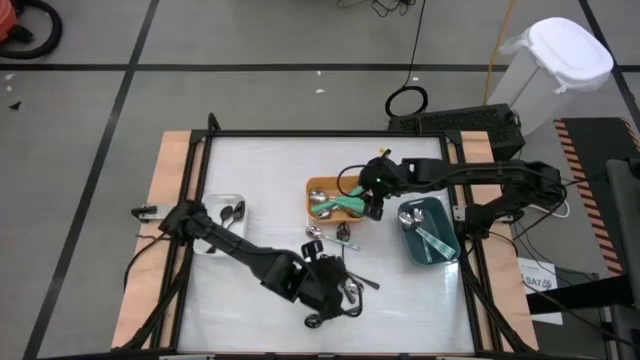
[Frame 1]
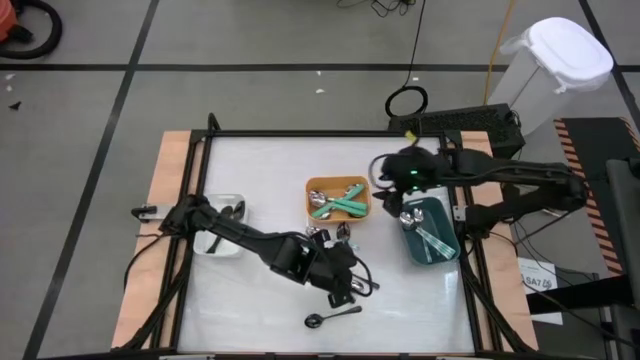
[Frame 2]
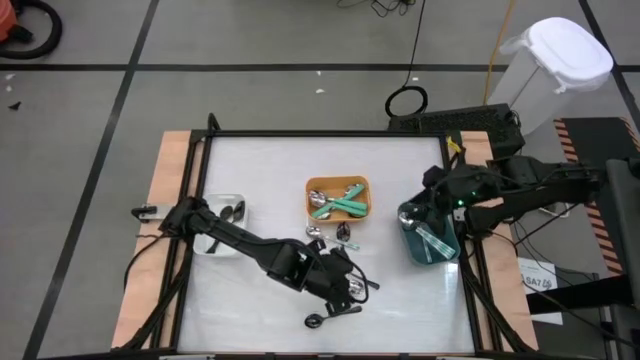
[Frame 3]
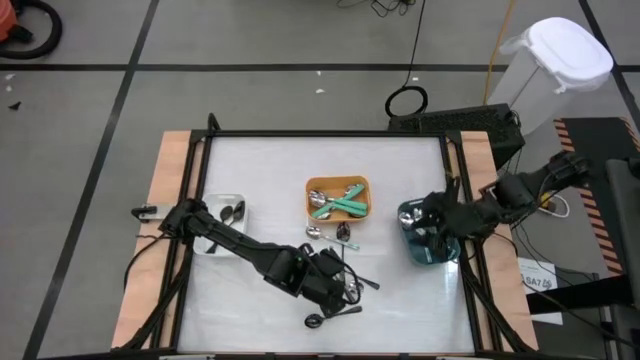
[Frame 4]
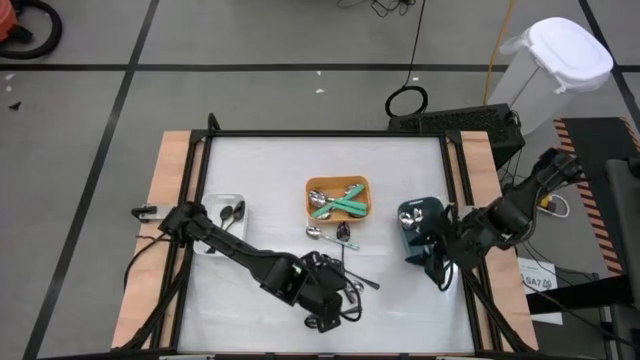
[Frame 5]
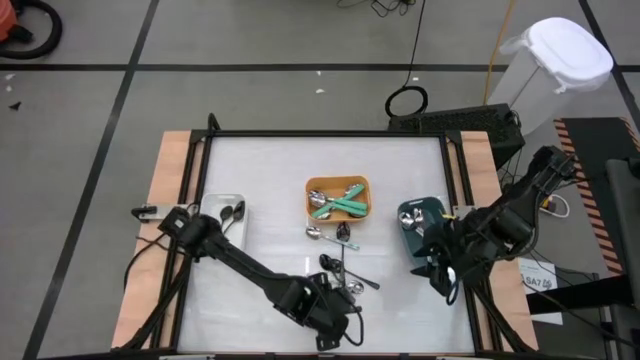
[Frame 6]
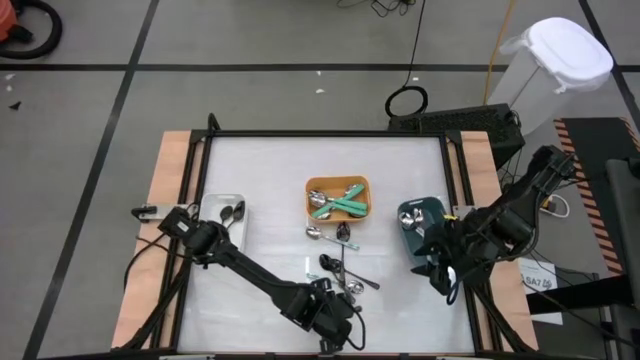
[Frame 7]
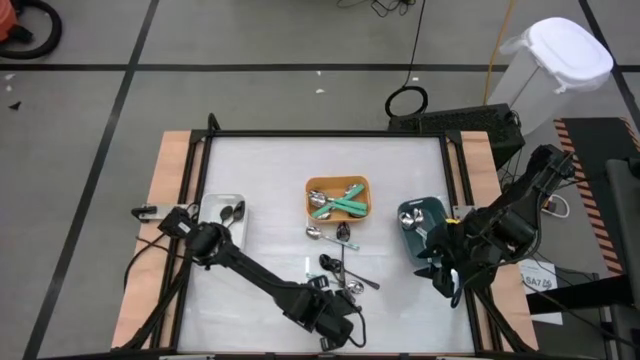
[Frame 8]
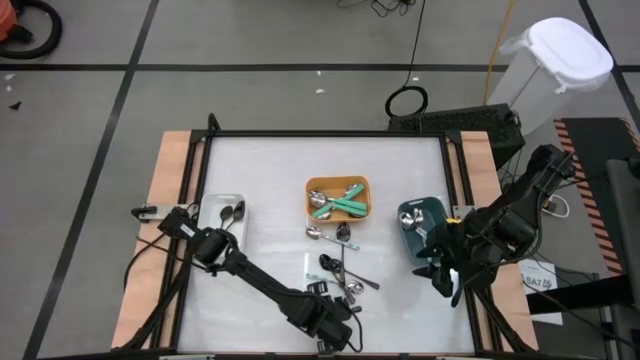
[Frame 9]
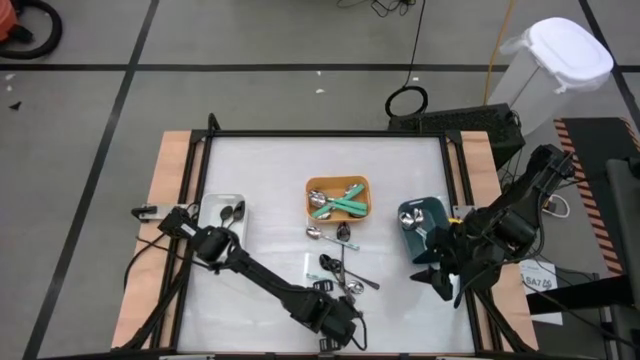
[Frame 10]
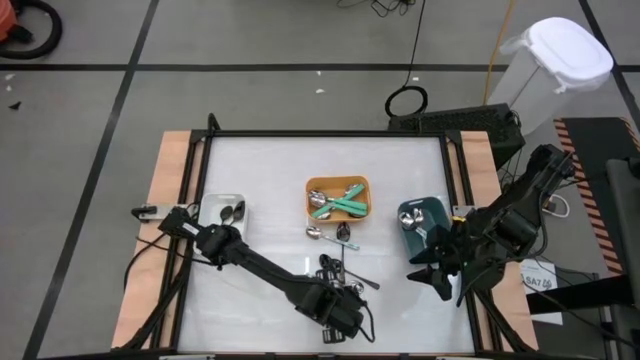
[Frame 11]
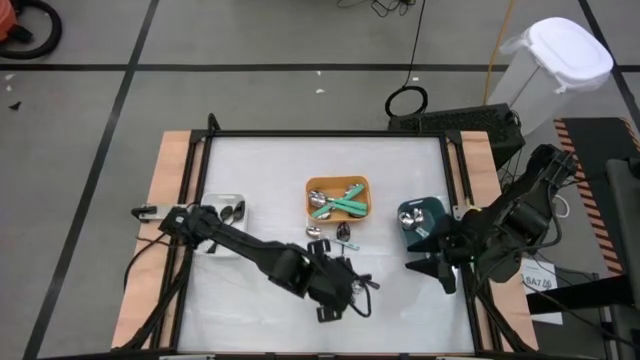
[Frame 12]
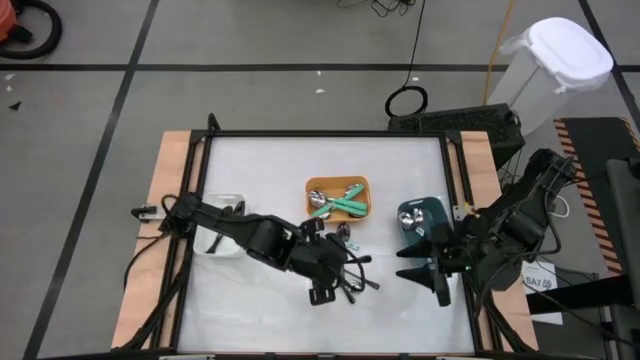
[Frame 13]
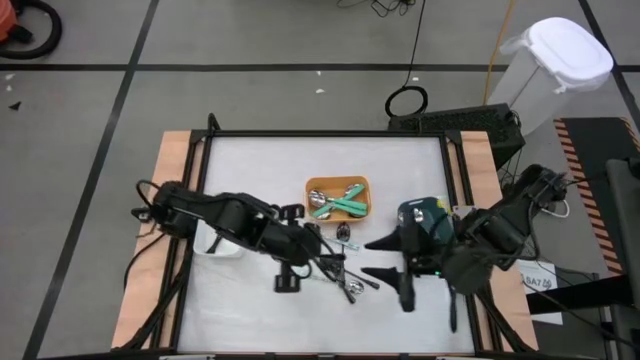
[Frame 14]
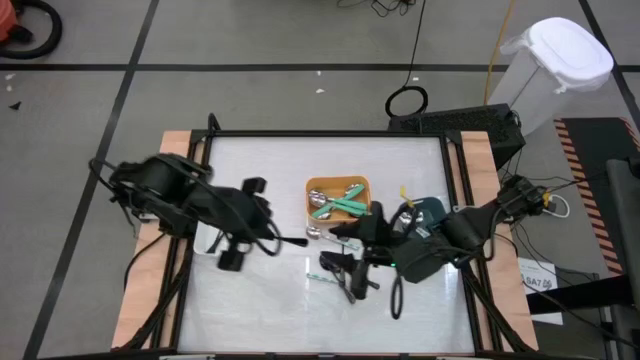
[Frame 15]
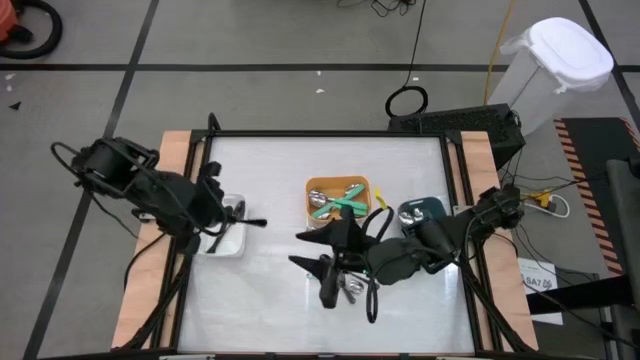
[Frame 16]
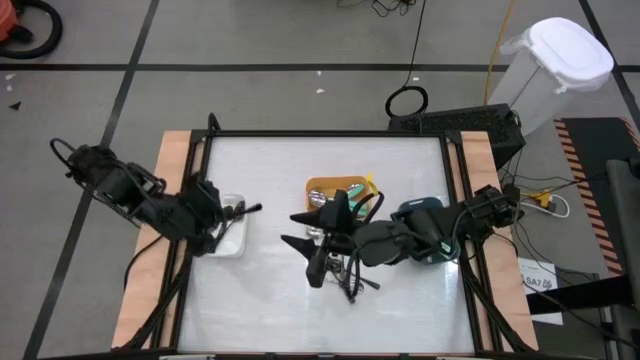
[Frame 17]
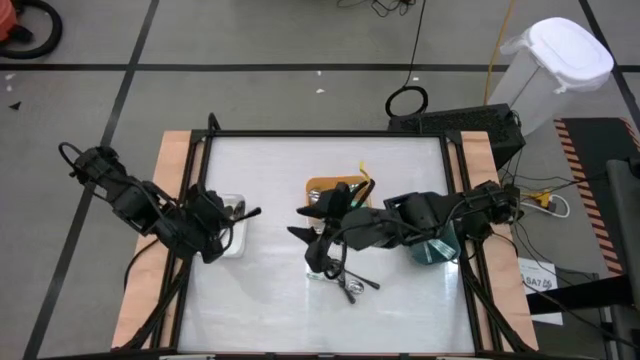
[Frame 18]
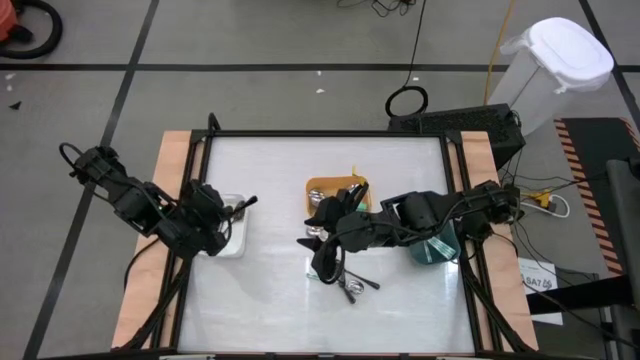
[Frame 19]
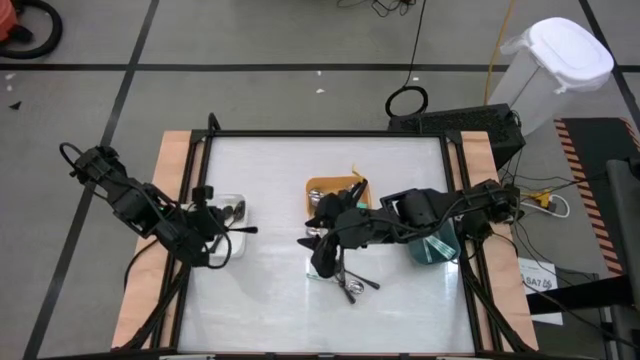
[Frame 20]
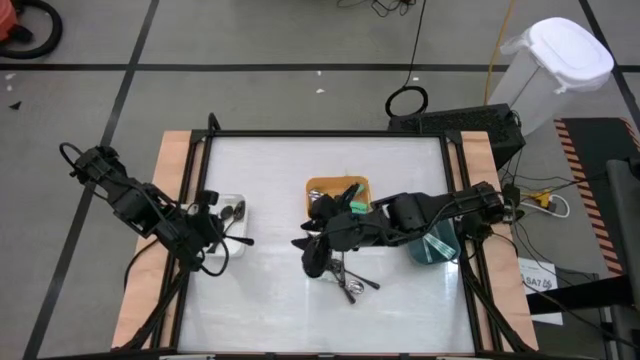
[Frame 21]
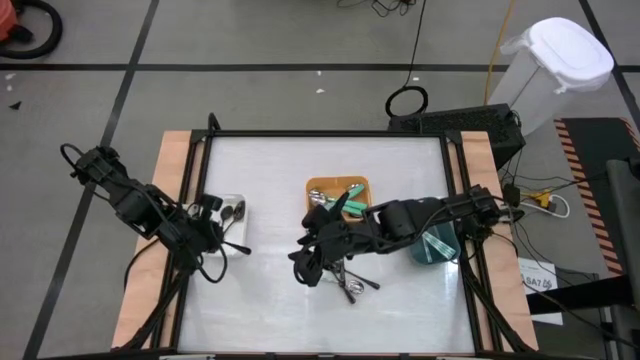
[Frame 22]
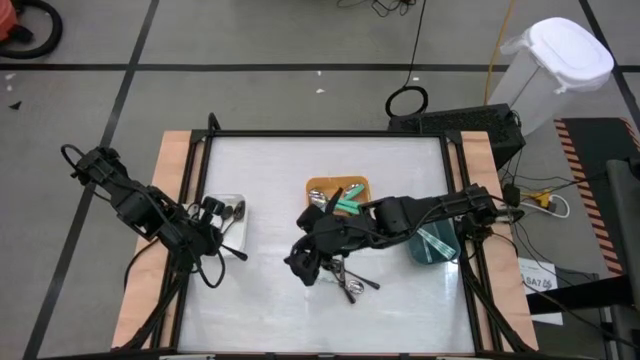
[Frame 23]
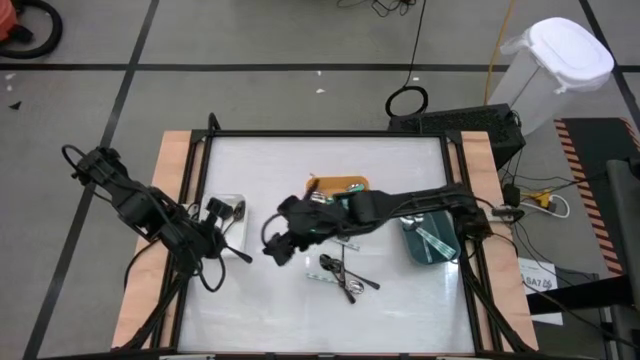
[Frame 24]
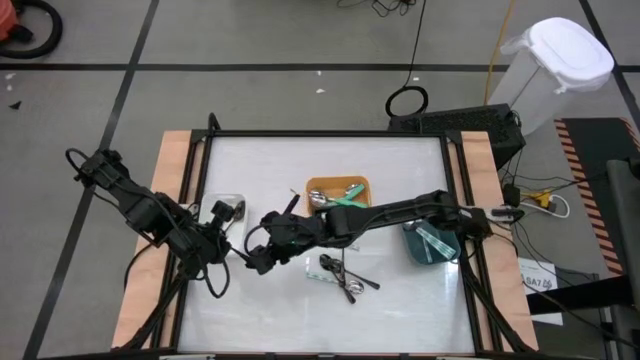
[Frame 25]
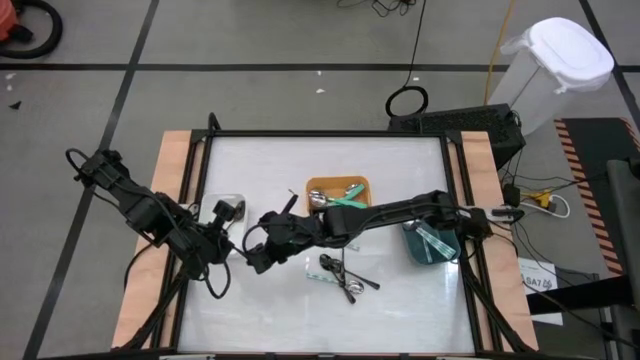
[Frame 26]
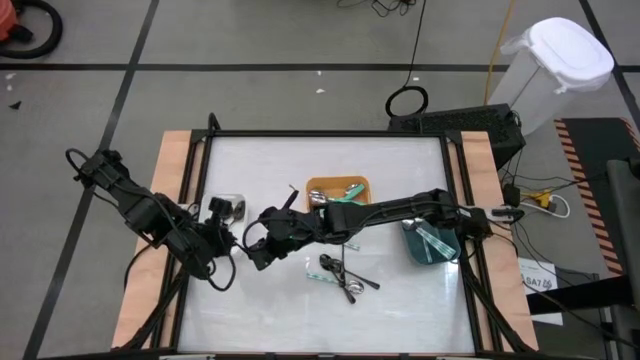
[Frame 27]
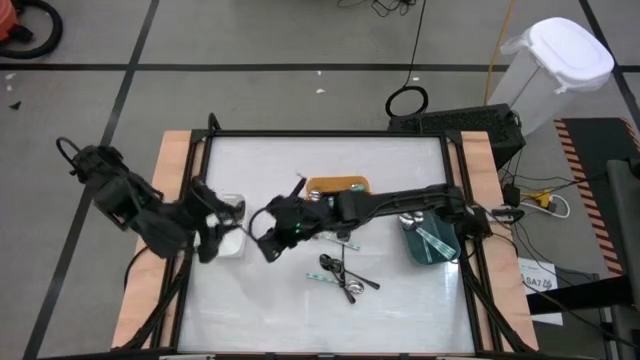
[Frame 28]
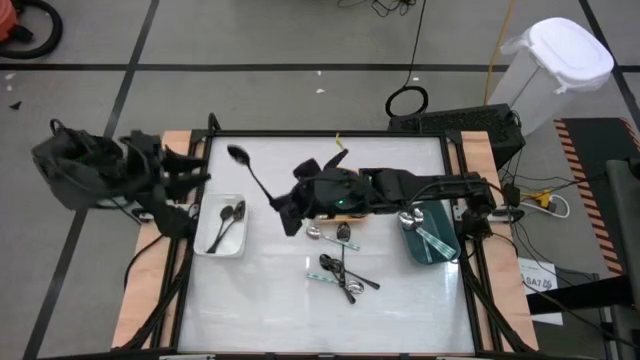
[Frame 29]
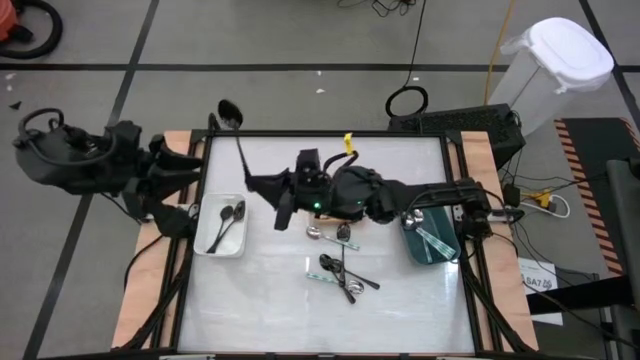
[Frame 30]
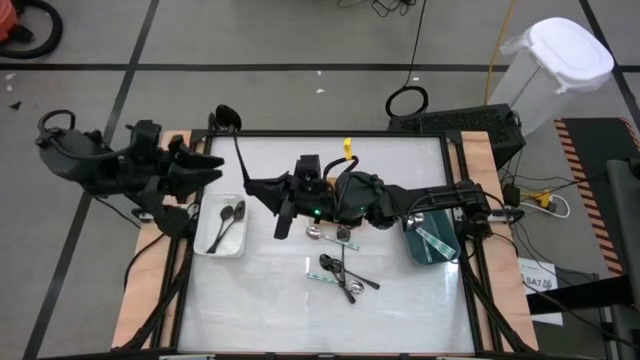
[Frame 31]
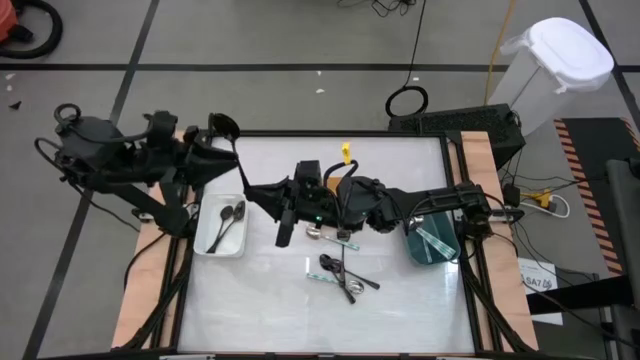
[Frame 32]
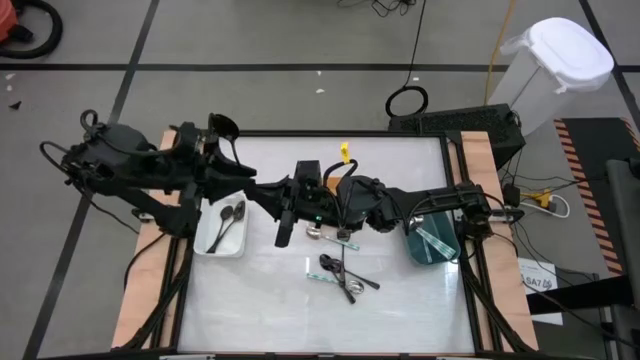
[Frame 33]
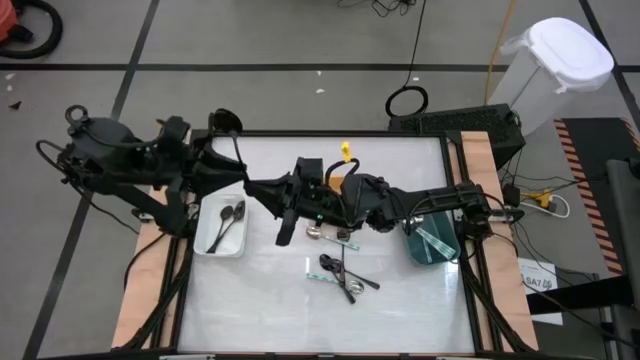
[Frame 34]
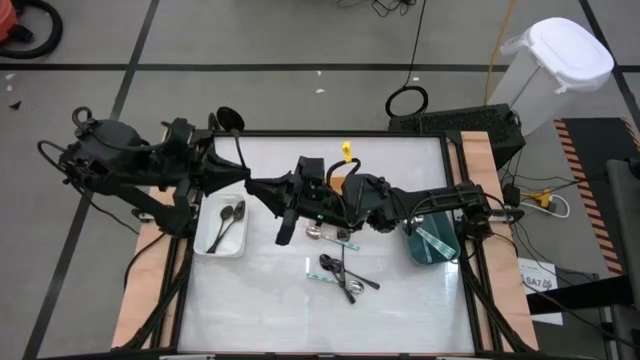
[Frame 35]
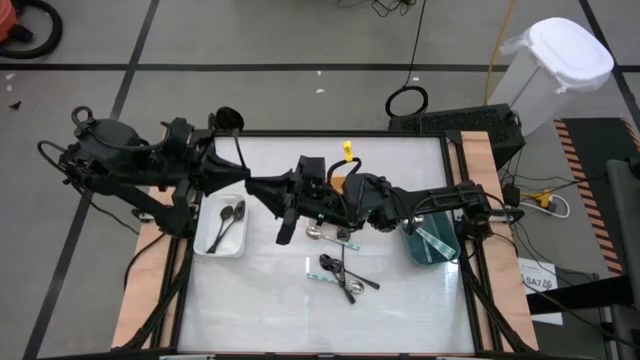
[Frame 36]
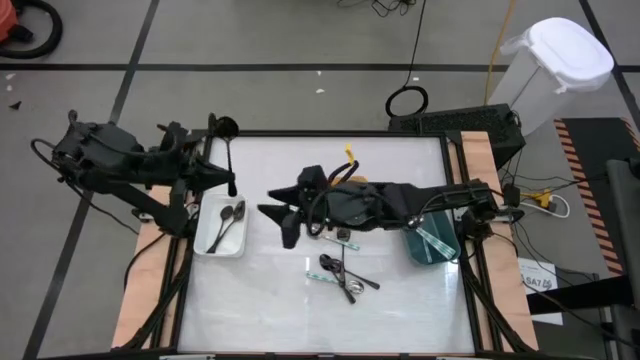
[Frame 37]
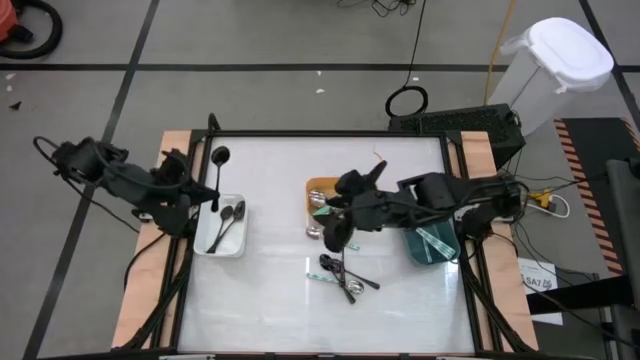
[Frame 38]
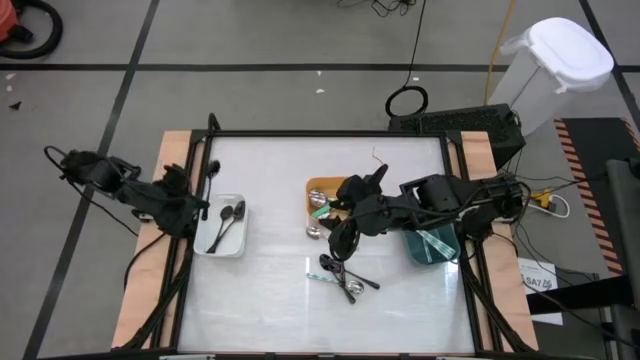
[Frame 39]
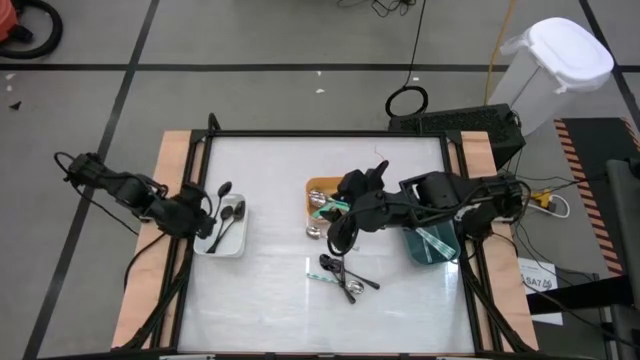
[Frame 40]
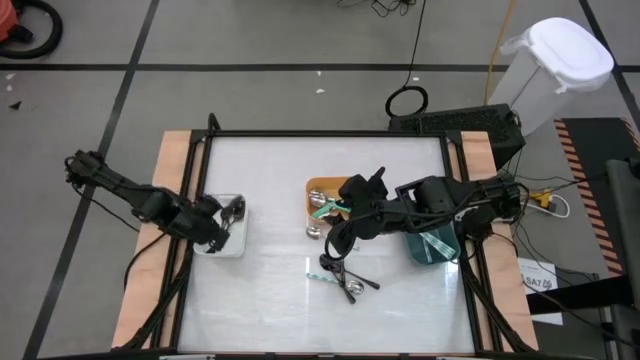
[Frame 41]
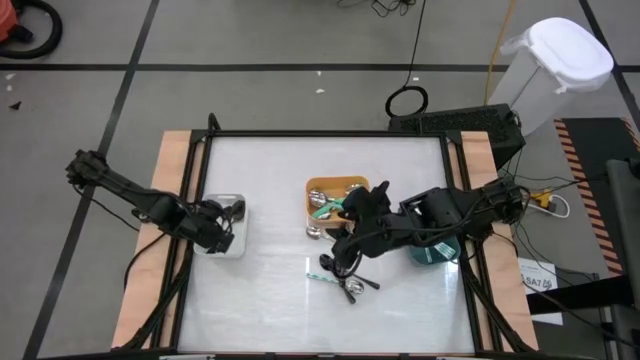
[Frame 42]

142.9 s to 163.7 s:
Task: Sort silverware by color (type)
Put the black spoon into the white bin
